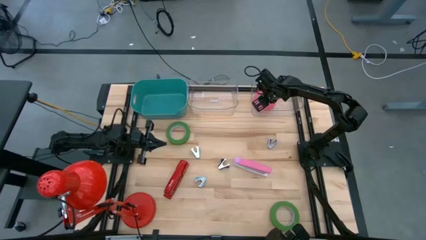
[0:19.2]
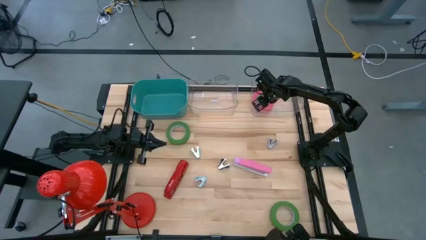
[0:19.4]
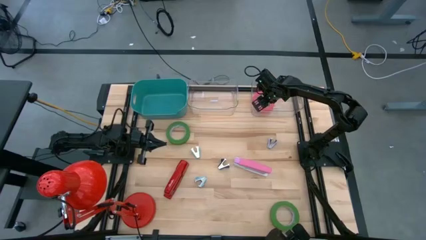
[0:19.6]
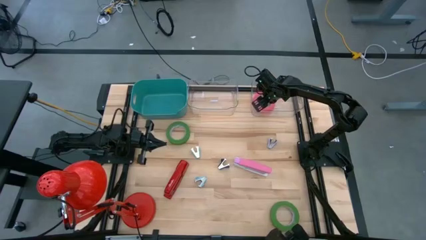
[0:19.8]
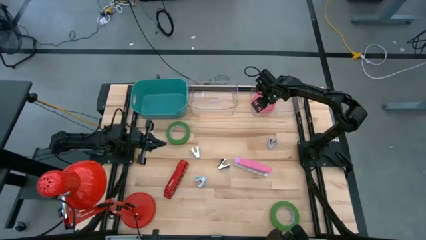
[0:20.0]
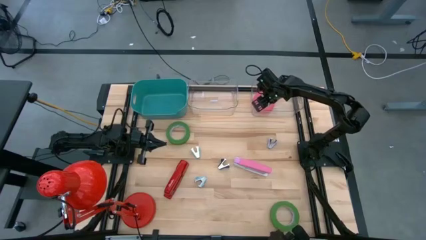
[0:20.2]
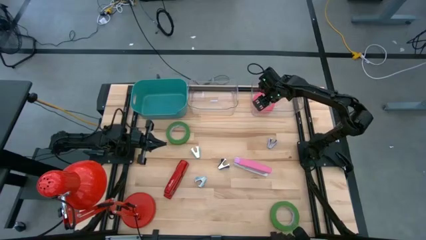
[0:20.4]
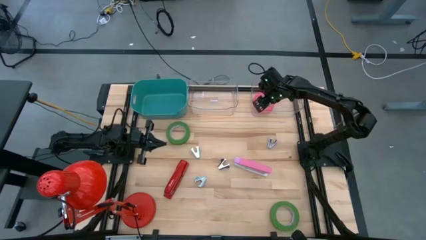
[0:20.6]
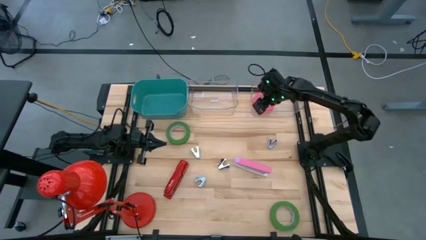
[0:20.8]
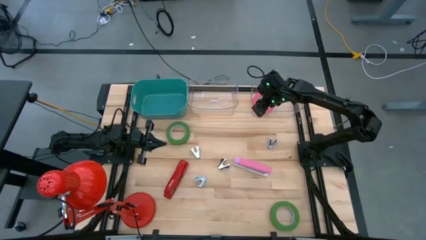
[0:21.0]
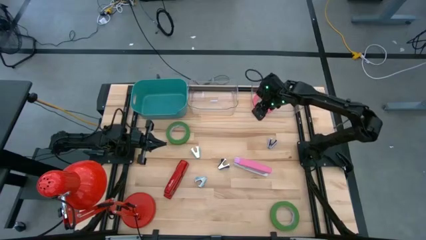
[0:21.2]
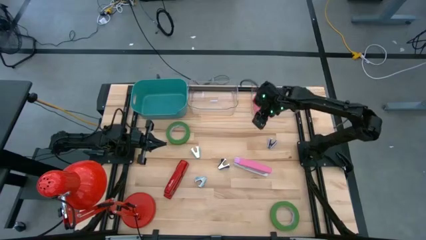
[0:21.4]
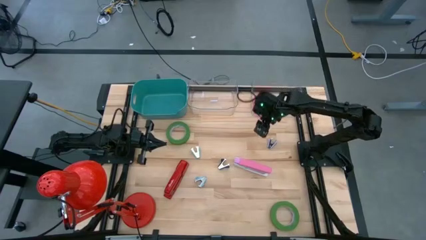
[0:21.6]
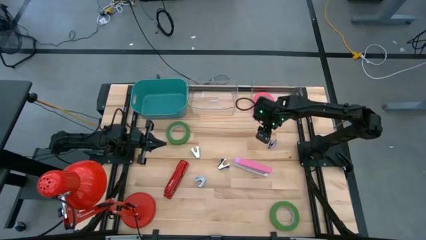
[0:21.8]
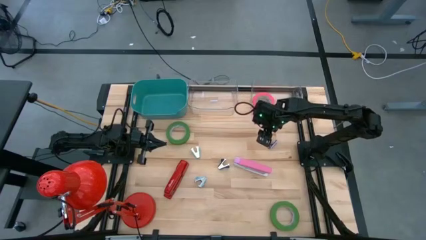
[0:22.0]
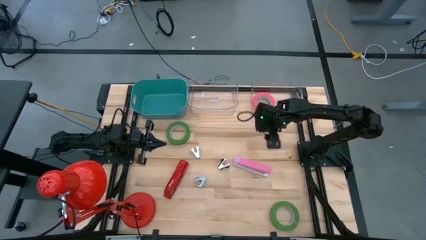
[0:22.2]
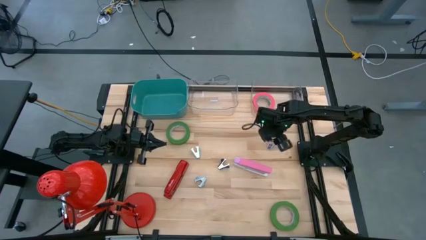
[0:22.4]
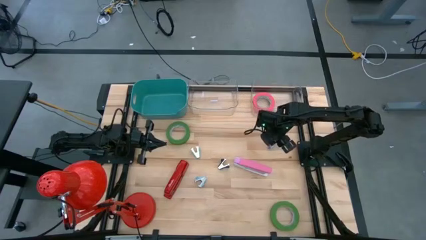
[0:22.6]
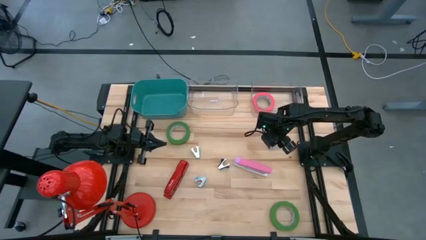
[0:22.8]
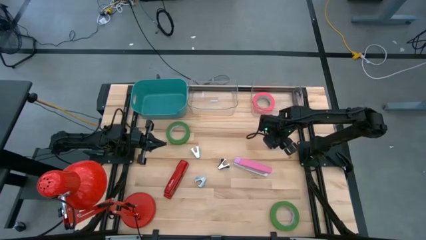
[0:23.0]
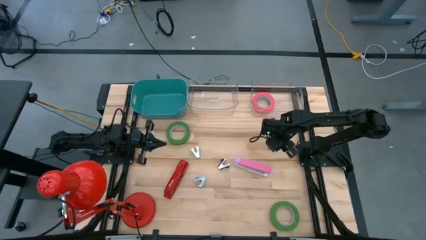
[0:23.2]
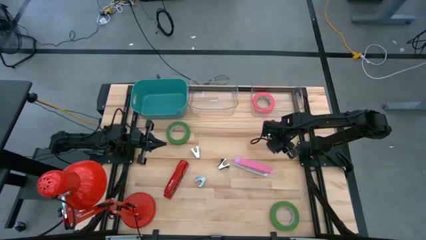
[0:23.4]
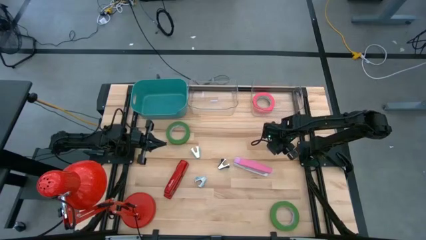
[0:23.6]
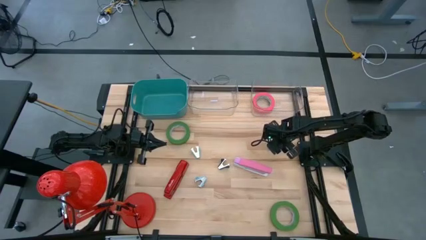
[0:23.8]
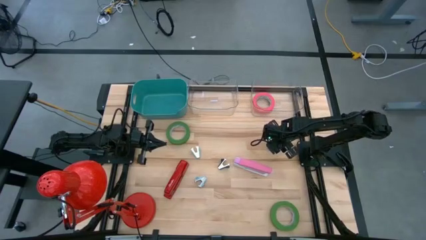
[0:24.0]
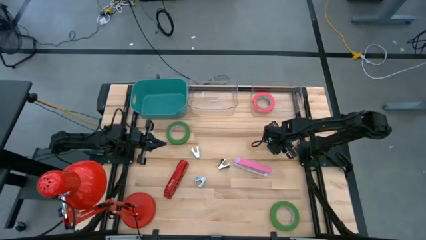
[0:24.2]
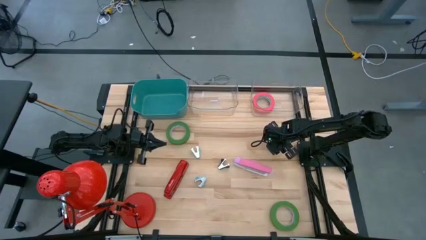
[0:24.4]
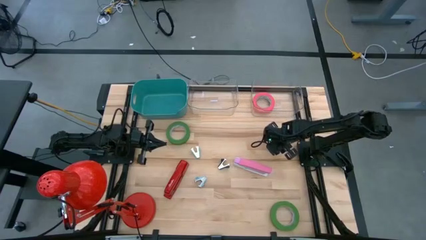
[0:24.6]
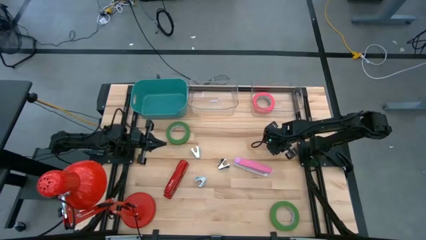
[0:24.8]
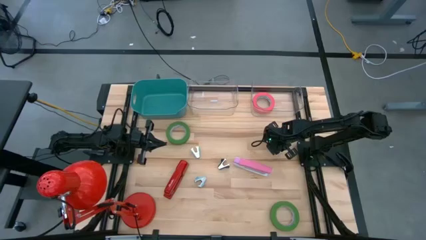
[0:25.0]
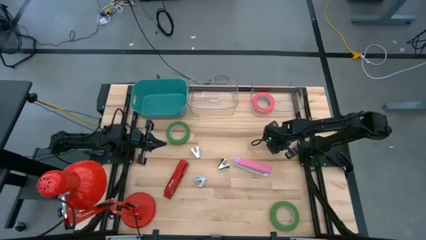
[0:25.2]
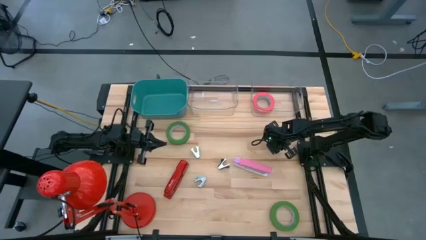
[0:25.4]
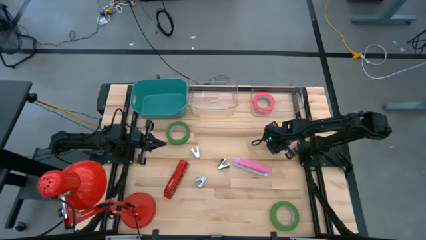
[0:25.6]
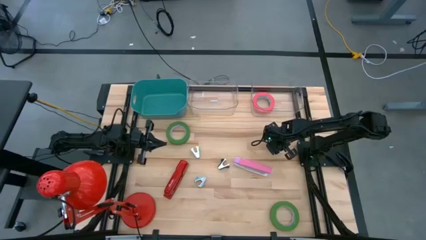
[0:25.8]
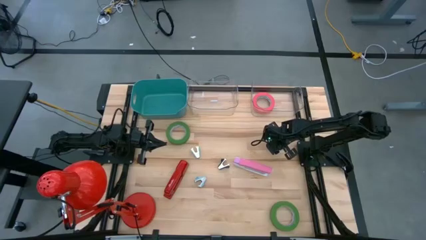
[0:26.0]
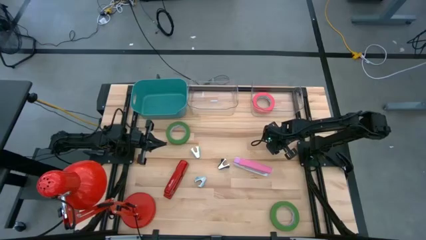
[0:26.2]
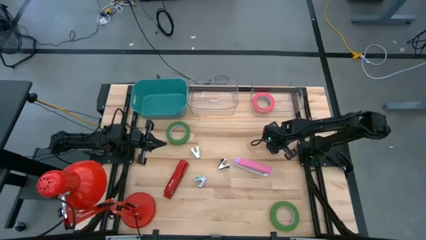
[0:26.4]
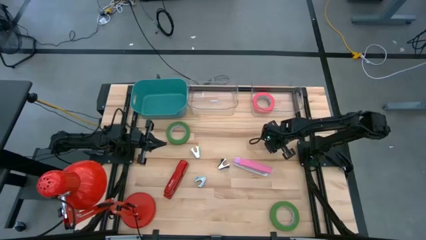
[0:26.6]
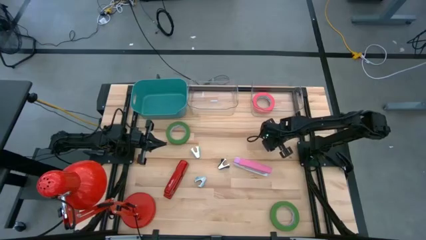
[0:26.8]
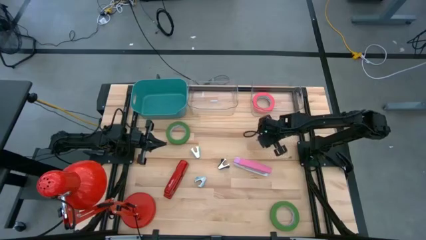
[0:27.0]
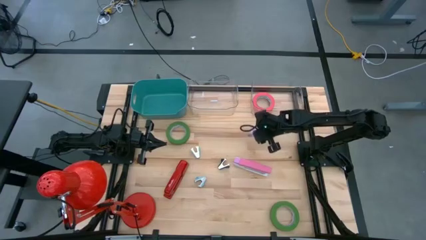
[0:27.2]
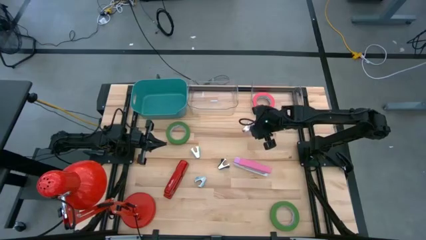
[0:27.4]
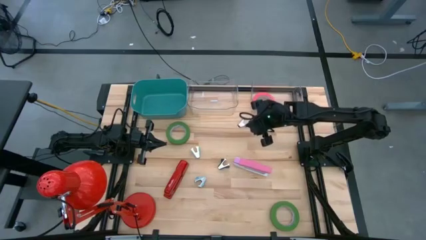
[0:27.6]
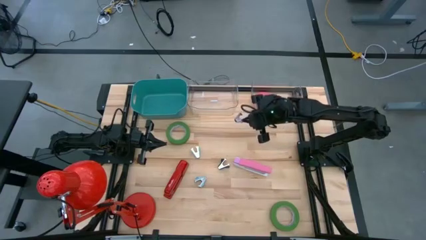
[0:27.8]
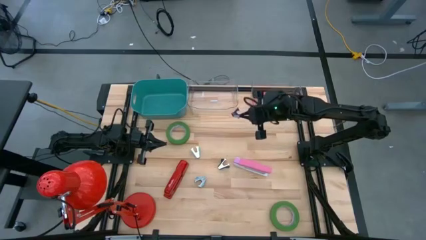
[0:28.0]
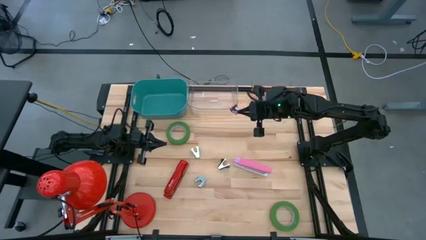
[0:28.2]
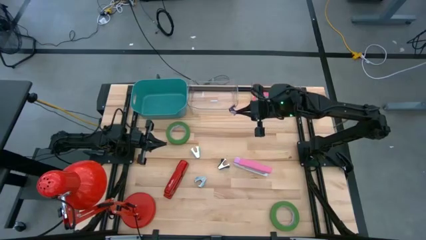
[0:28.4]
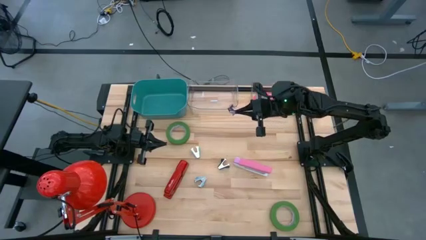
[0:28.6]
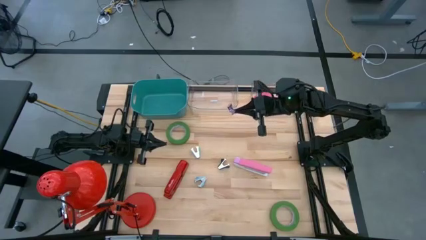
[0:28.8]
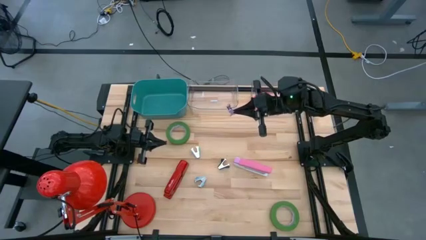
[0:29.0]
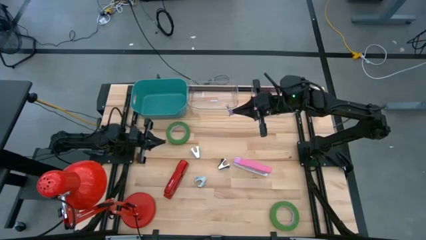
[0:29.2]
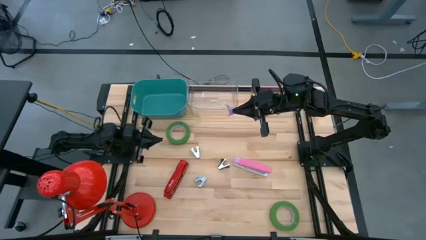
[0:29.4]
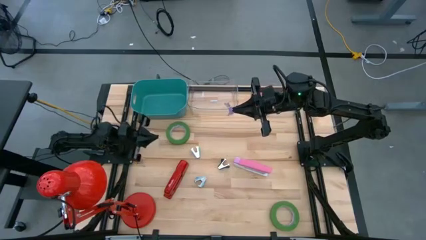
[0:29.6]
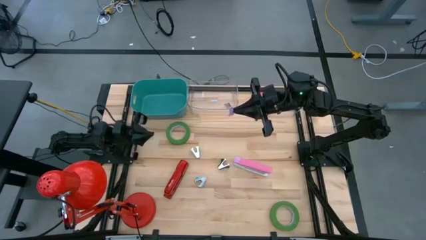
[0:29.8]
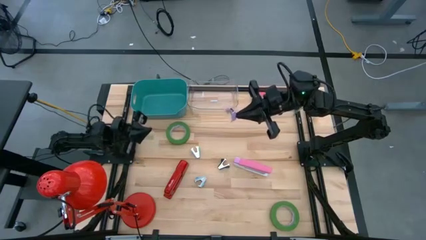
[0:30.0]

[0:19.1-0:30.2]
Task: Pick and place Stapler, Stapler remover, tape
Put the purple staple remover into the blue bin
